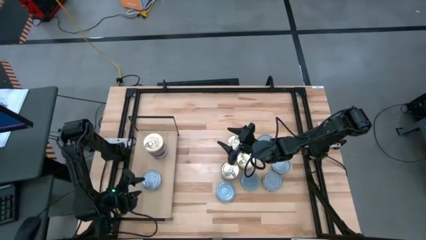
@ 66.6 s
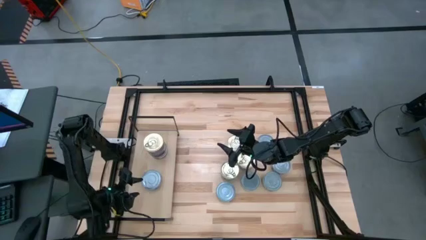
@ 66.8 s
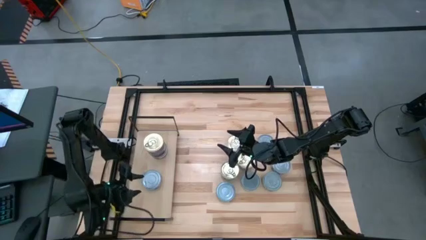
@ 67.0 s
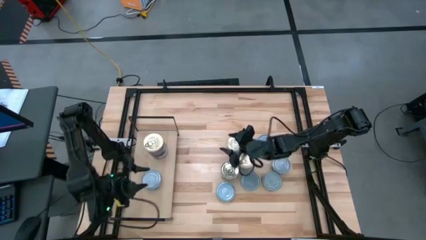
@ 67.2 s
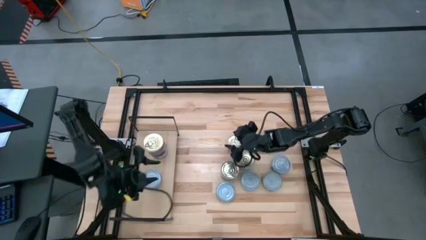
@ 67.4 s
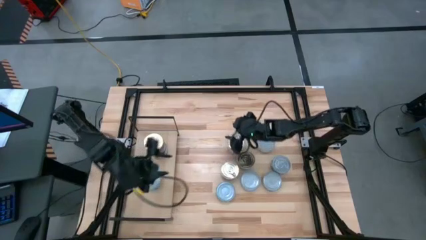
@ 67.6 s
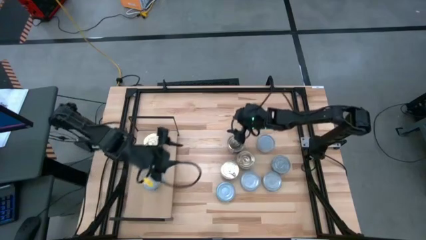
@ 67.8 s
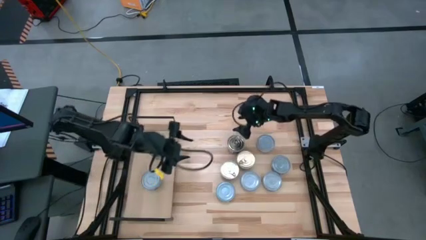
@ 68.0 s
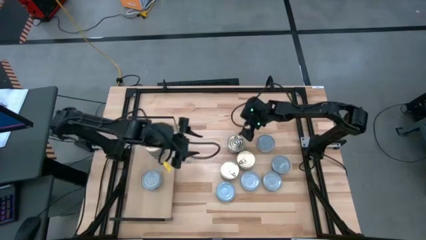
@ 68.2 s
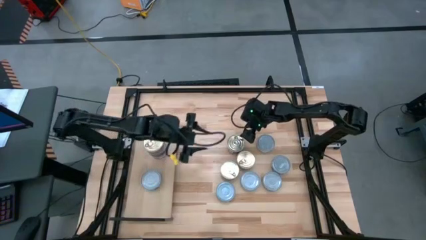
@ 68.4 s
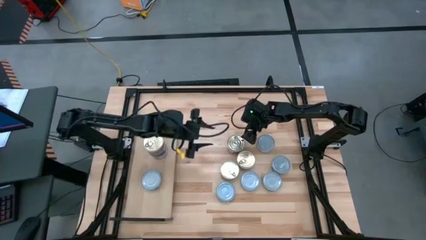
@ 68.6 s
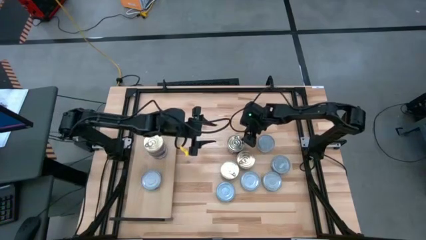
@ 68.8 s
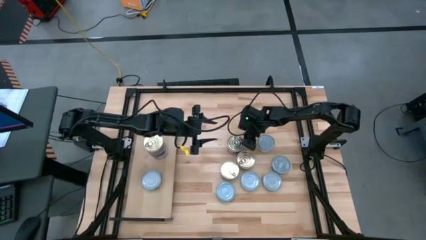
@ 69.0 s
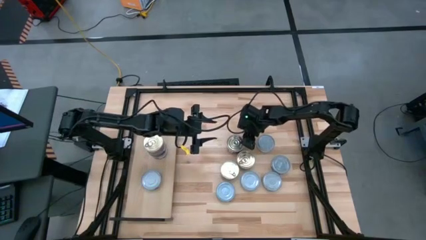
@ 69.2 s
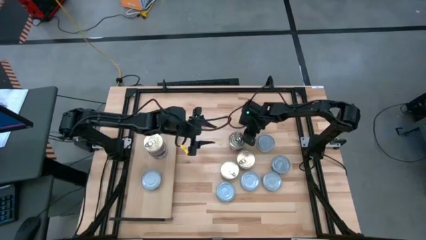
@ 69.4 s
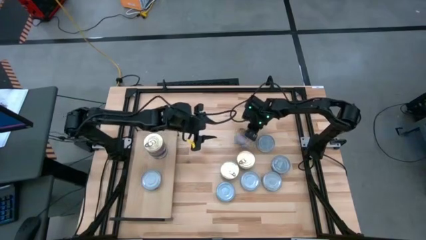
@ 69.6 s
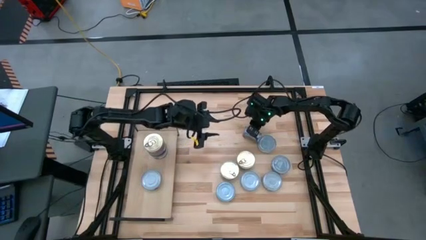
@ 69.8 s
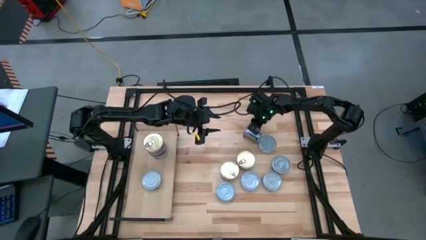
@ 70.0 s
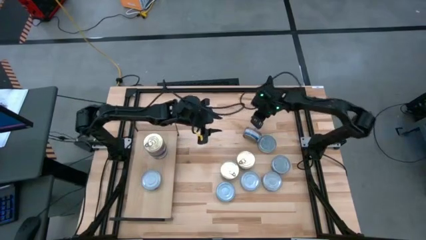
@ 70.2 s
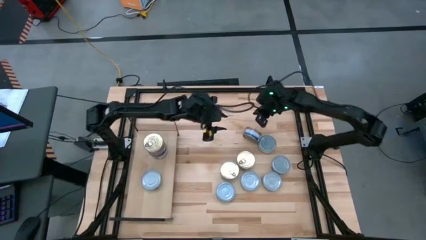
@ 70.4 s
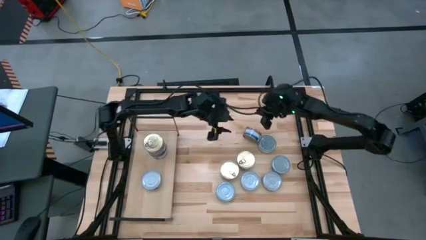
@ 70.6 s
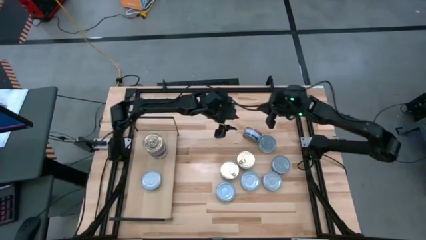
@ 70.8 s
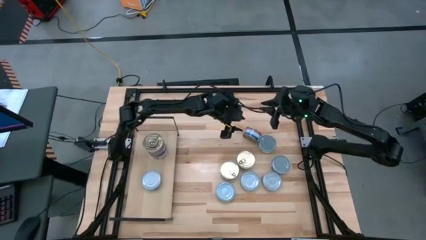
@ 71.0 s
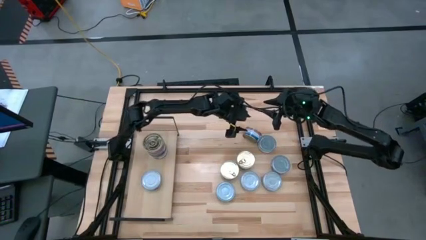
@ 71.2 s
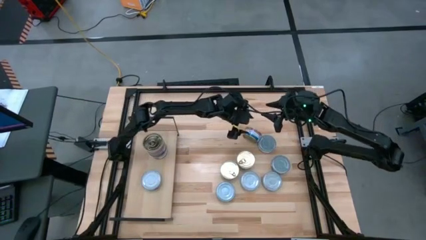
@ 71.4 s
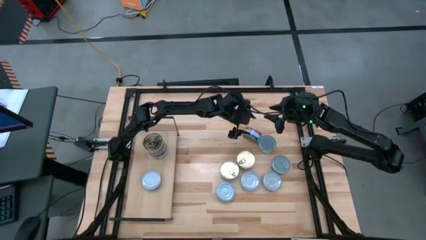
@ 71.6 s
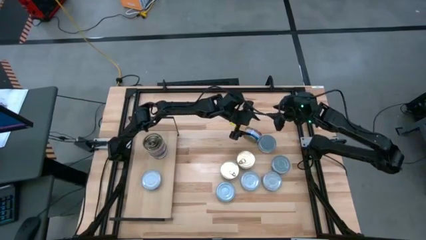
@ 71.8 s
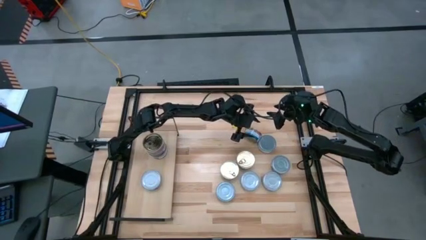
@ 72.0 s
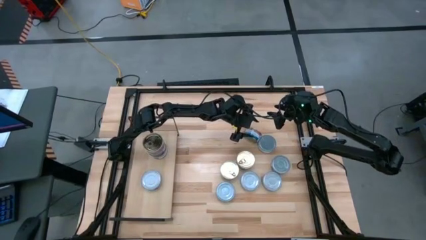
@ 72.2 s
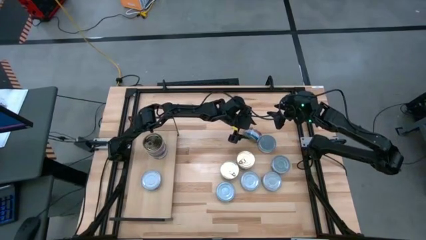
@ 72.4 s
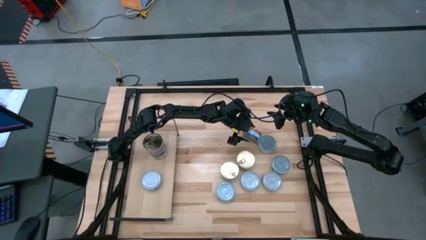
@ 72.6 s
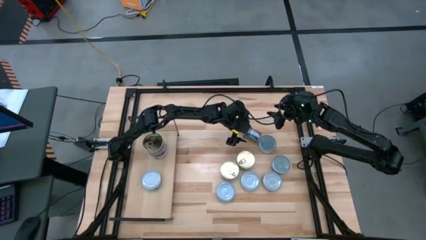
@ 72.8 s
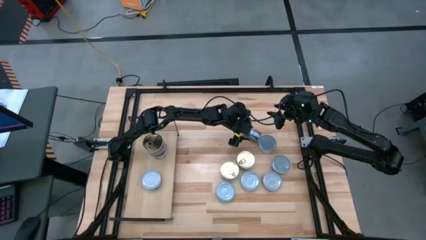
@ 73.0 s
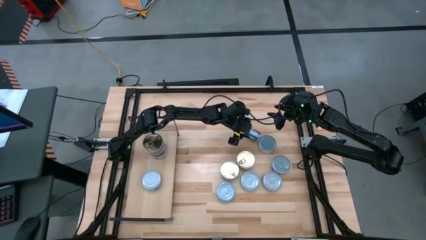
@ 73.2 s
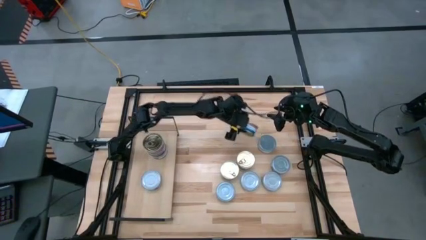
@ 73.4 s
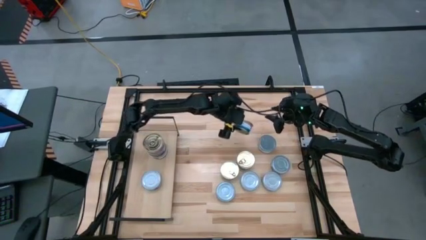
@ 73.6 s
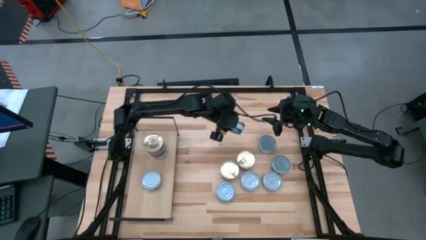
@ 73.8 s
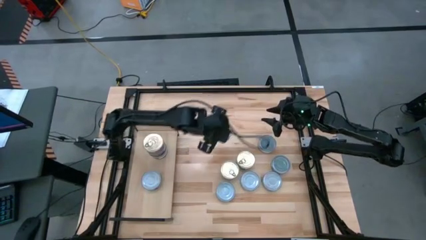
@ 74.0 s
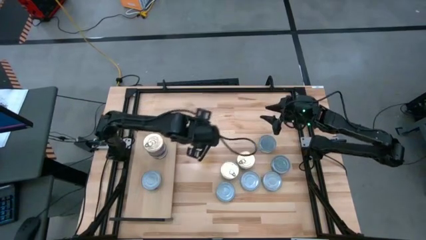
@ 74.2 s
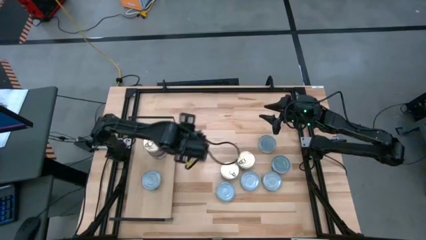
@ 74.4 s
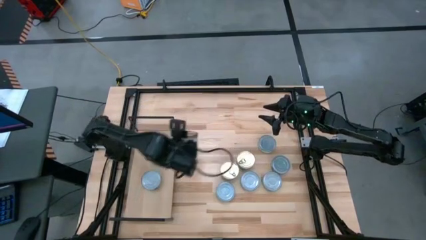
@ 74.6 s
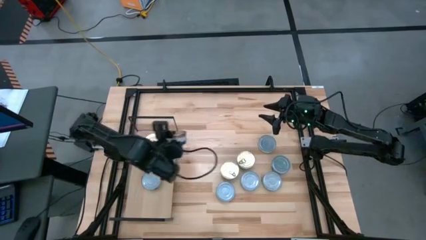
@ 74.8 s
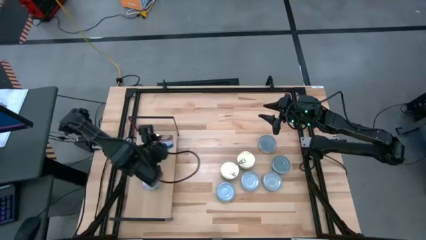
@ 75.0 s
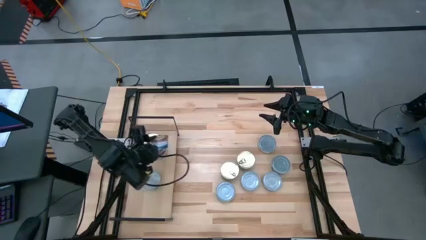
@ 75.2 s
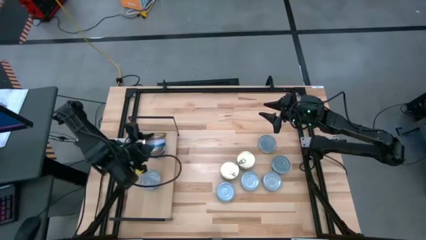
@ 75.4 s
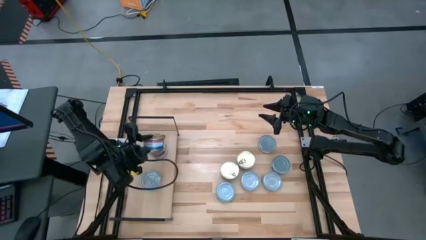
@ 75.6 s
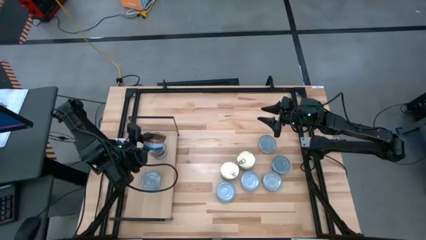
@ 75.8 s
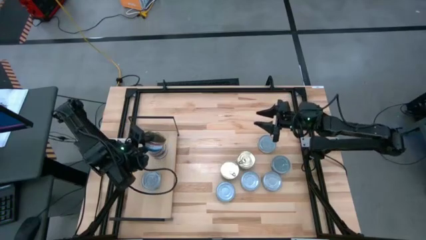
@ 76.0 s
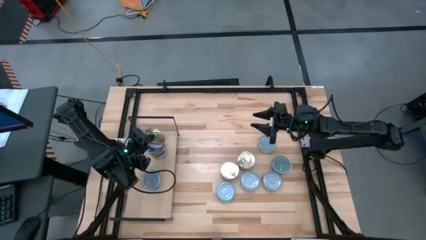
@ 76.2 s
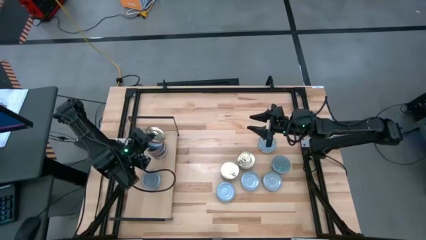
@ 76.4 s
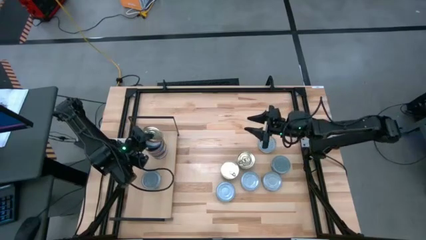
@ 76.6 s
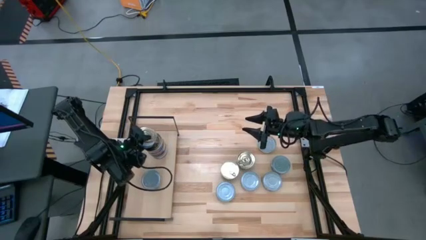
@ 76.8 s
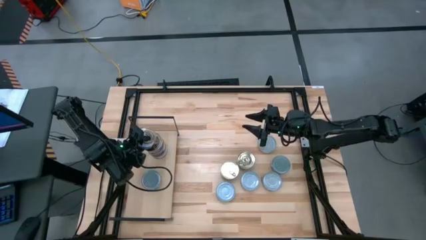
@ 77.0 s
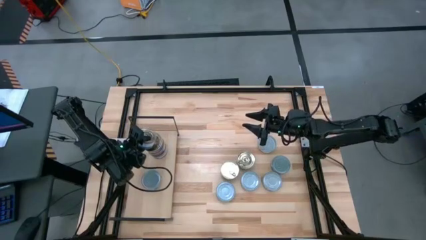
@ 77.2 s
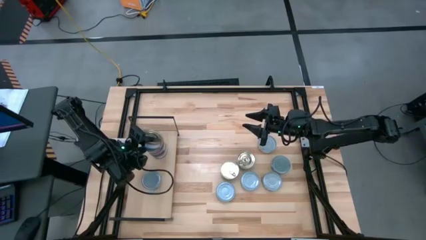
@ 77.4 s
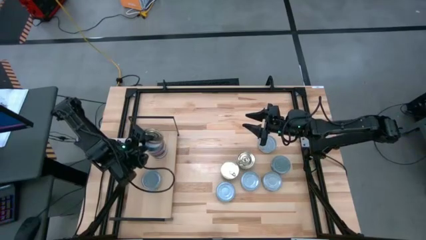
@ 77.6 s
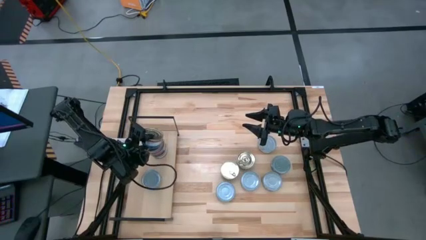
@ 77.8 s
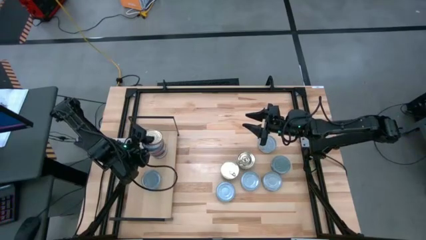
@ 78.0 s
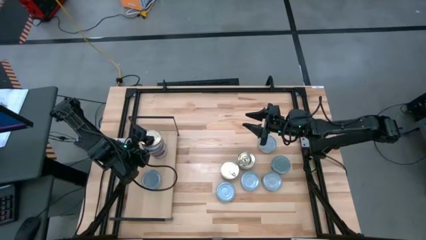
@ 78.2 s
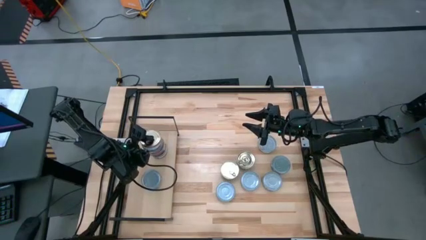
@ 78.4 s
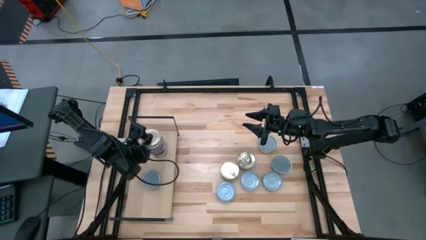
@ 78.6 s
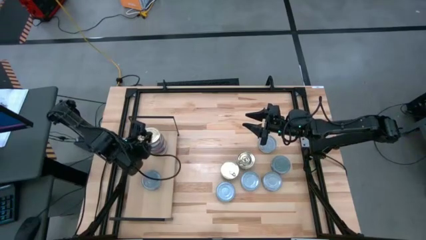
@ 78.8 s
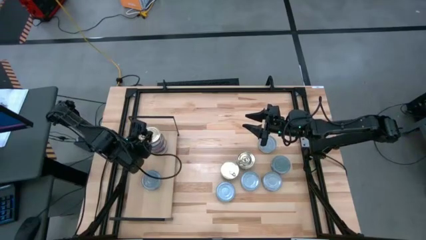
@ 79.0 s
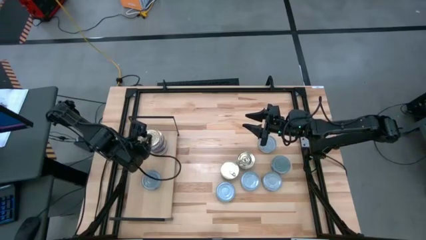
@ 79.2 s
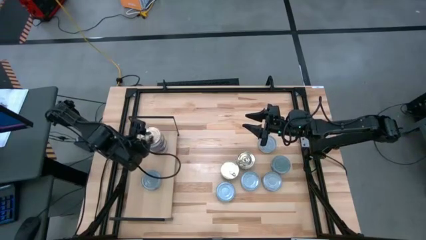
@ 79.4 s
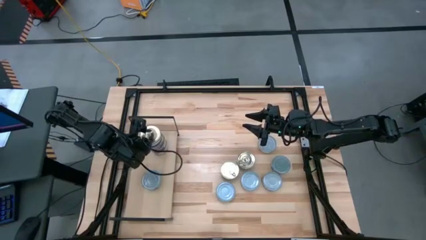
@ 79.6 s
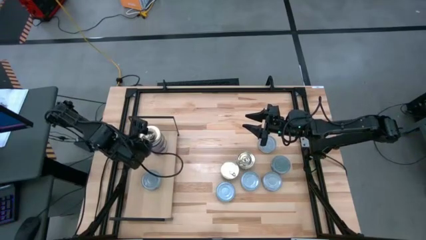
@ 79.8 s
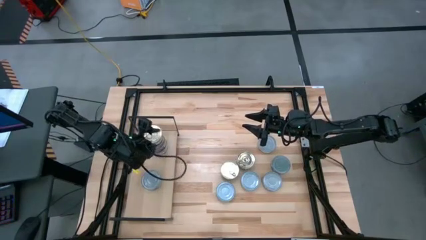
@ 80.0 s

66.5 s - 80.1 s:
Task: Stack canned seafood by type on shelf
Stack the top right blue and pink tuna can on the blue and pink tuna can on the shelf
